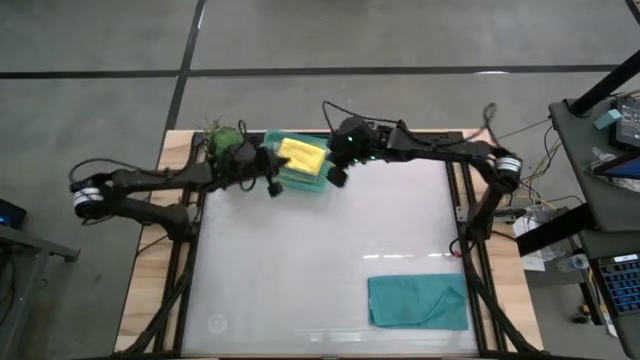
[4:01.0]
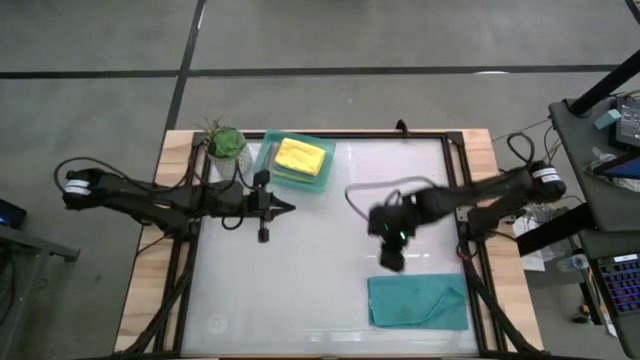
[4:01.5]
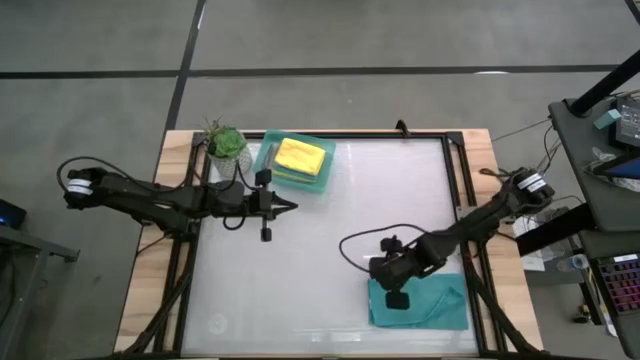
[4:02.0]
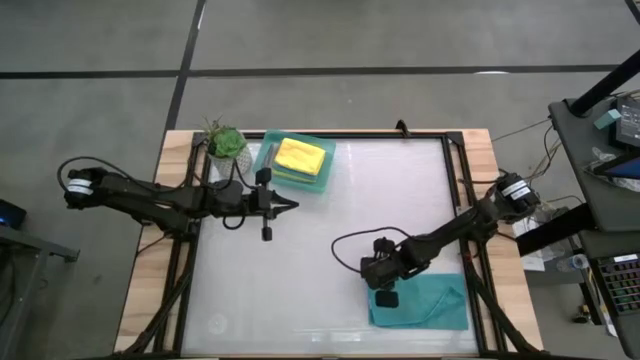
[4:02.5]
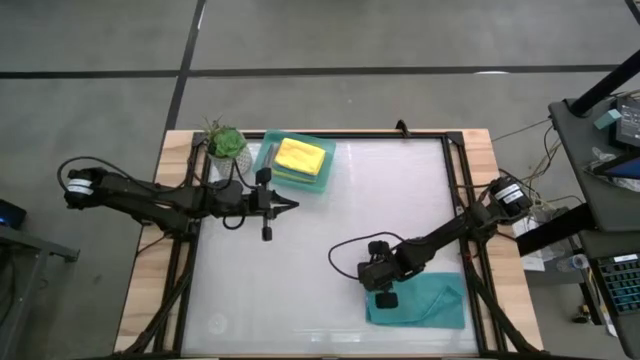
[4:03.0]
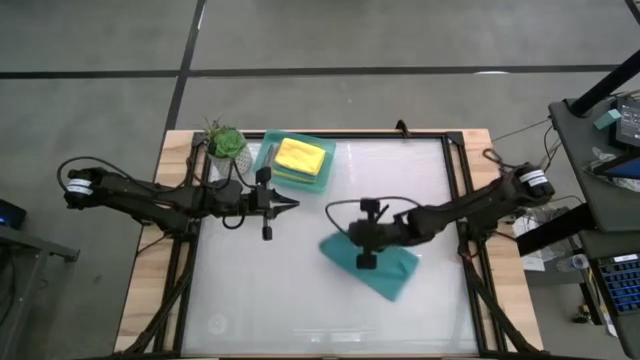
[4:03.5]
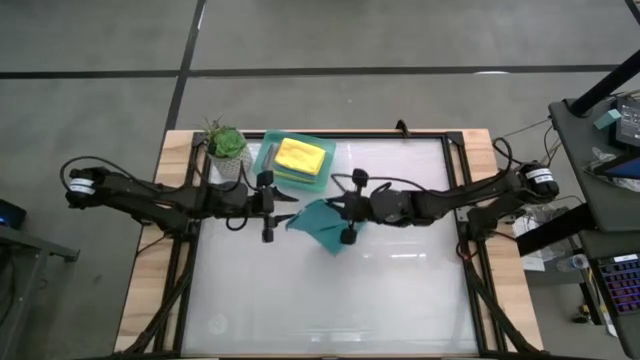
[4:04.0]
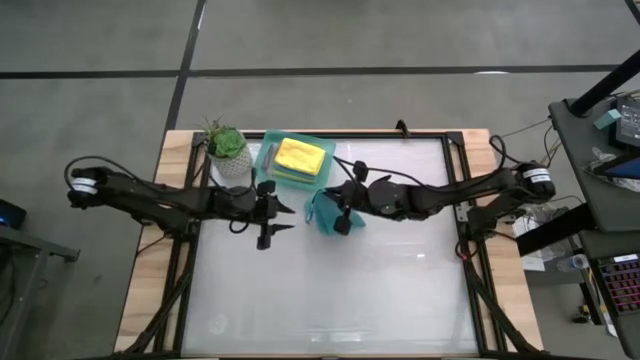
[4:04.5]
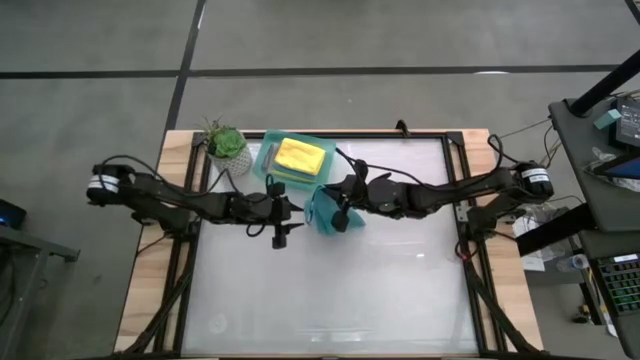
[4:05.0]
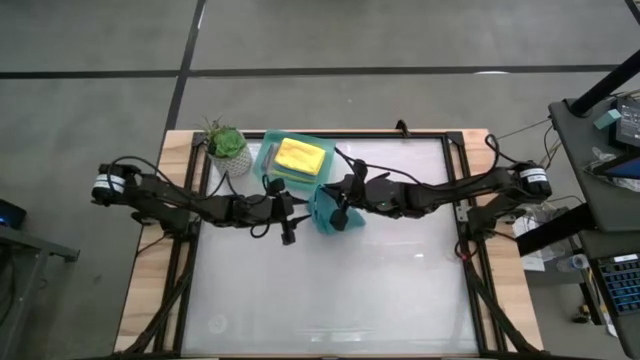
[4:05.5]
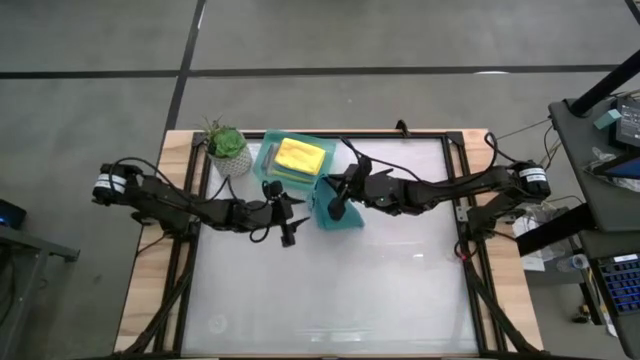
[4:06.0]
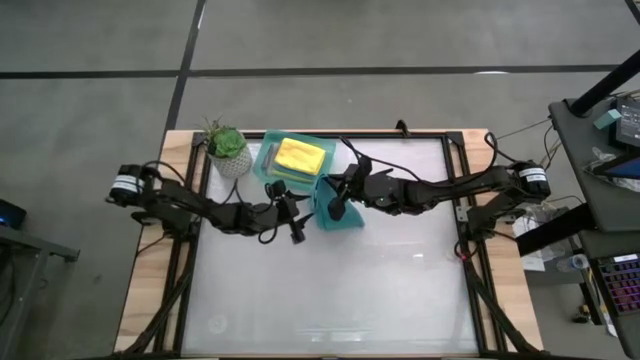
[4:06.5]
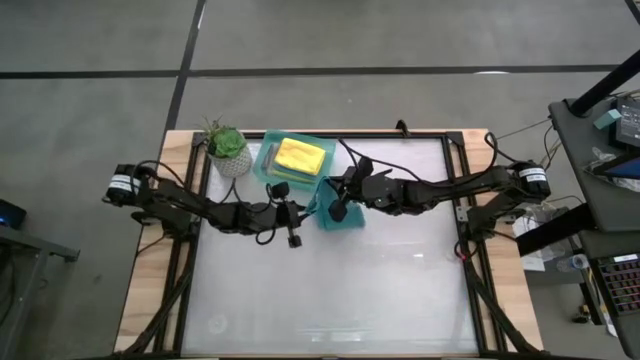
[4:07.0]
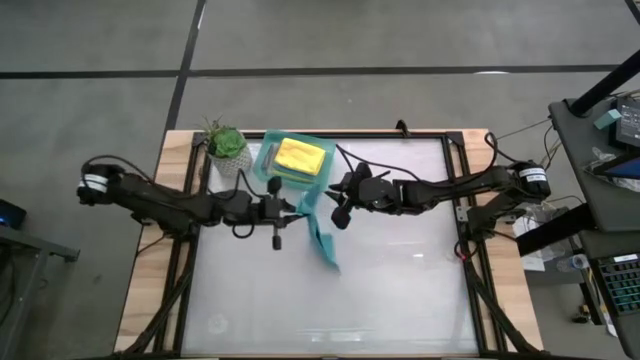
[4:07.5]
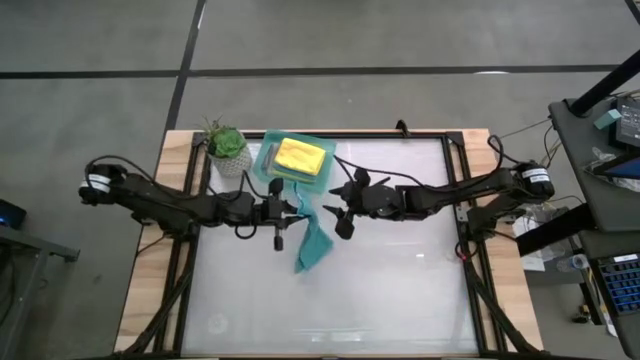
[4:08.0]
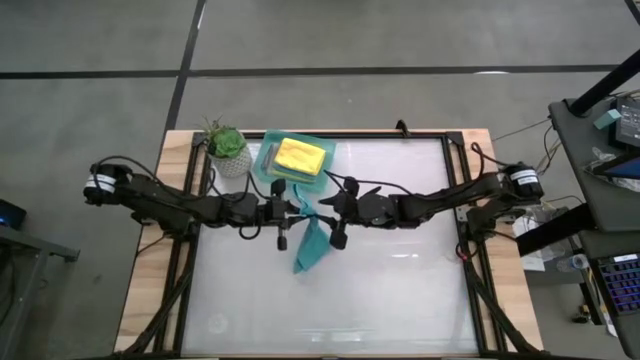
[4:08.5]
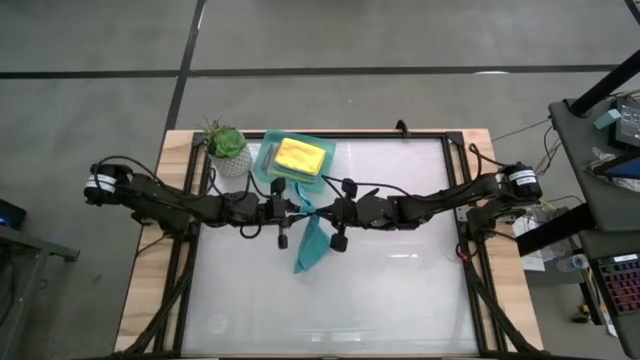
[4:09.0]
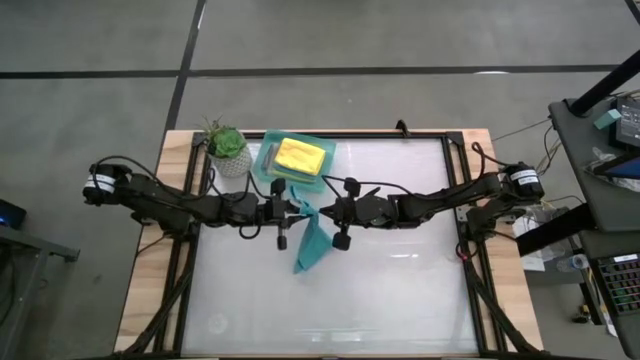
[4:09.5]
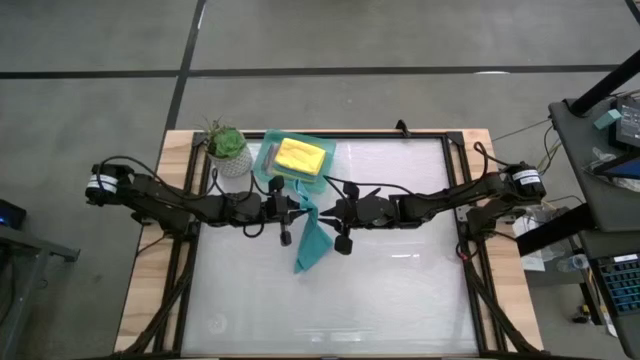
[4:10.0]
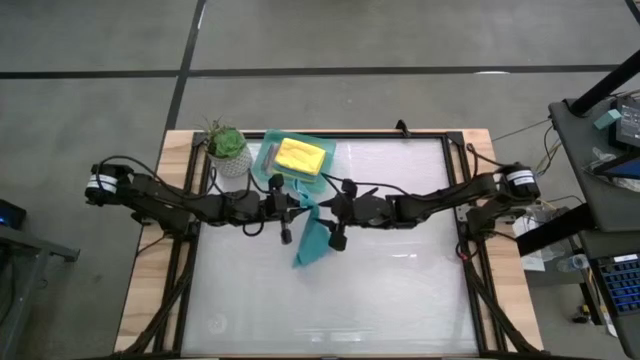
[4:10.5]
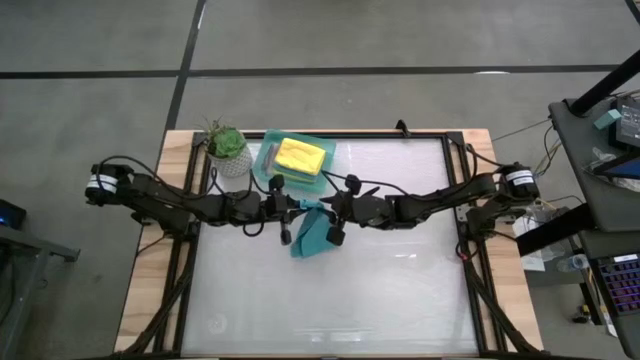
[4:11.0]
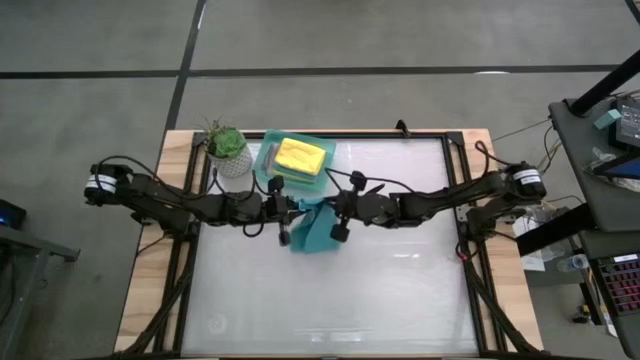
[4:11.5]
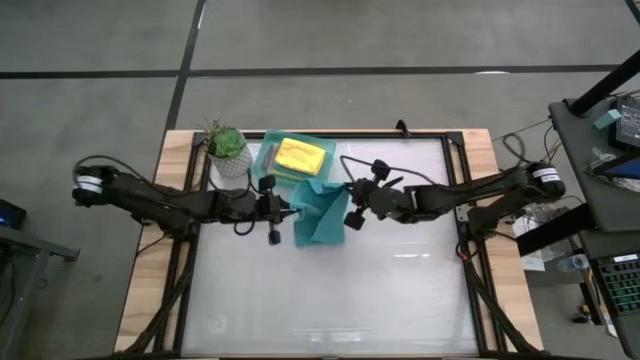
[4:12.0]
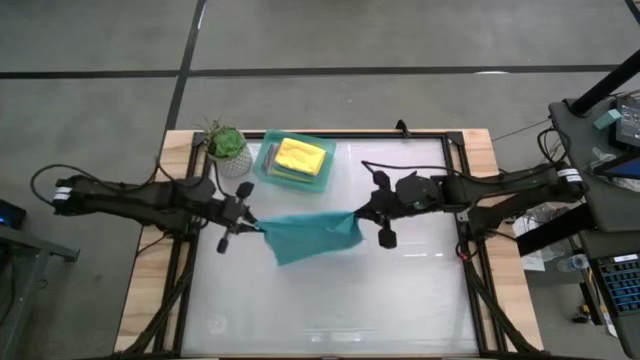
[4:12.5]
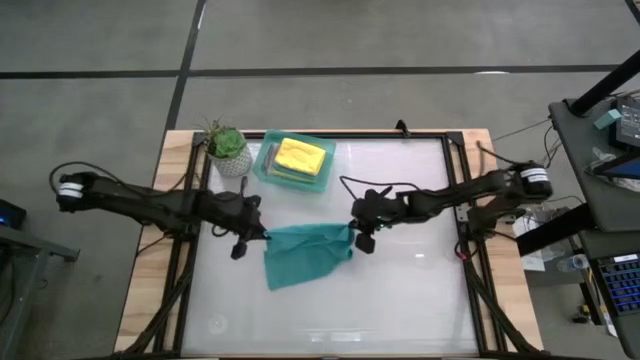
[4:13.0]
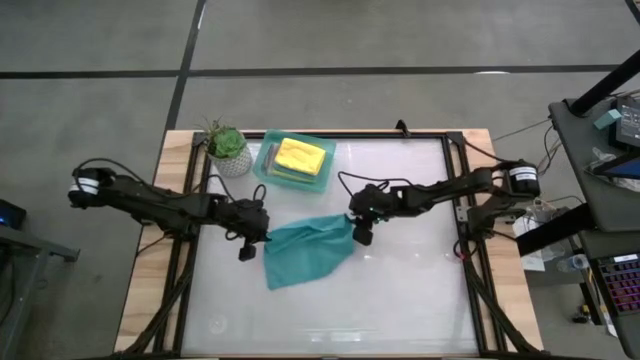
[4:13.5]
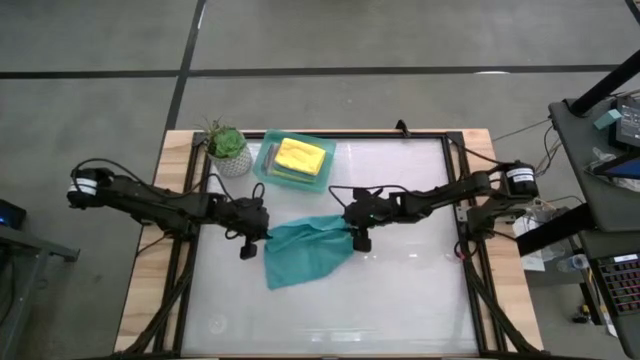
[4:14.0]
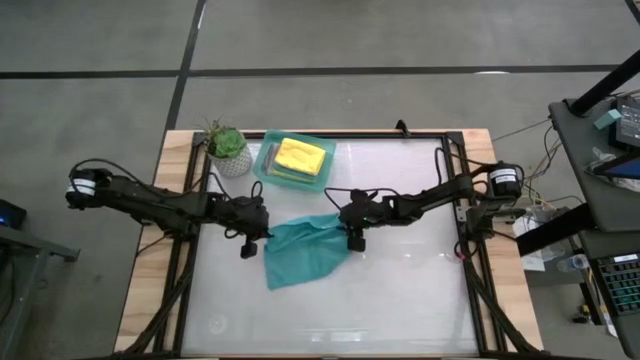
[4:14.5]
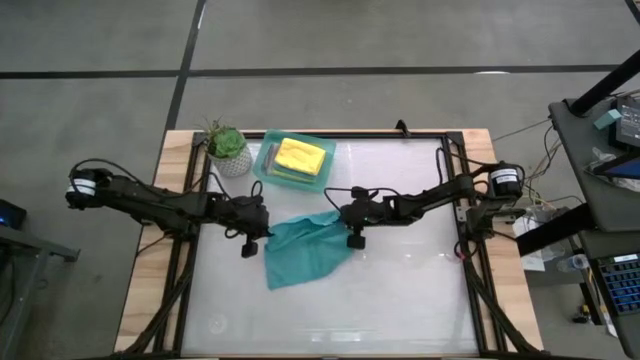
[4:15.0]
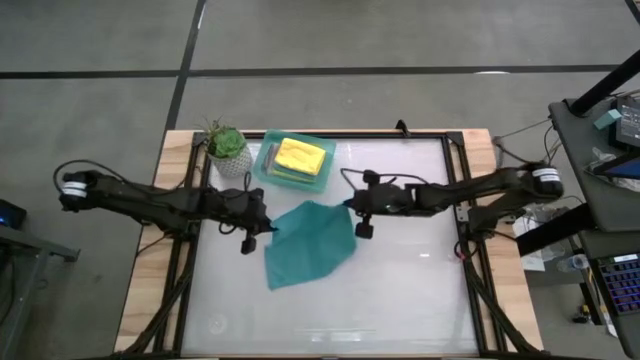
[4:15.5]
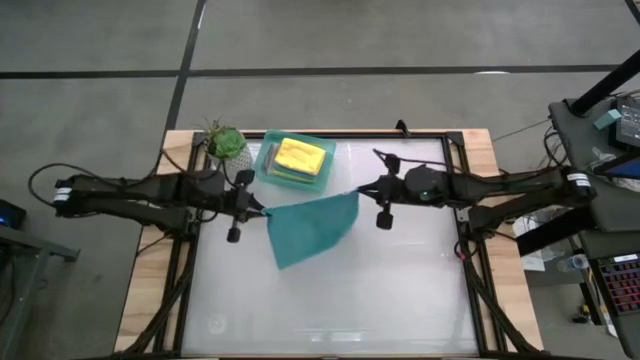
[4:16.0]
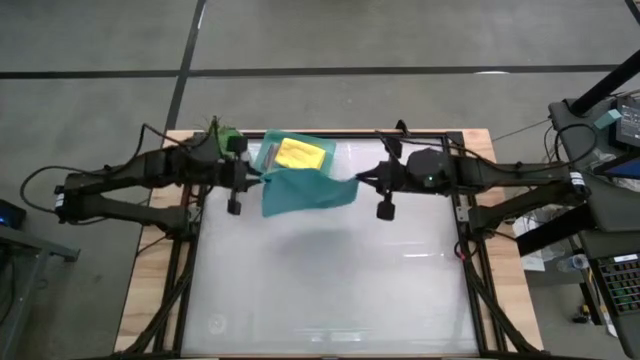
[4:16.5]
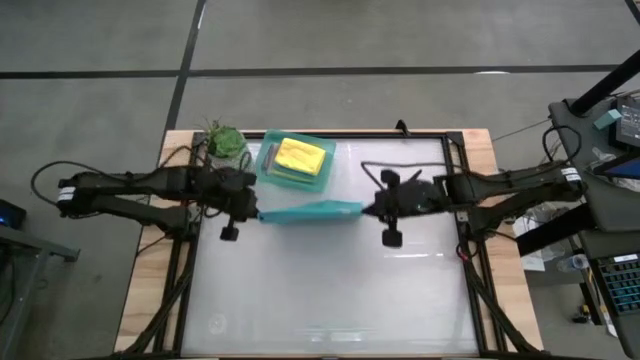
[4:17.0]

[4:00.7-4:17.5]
Task: Fold microfiber towels
Fold the blue microfiber towel

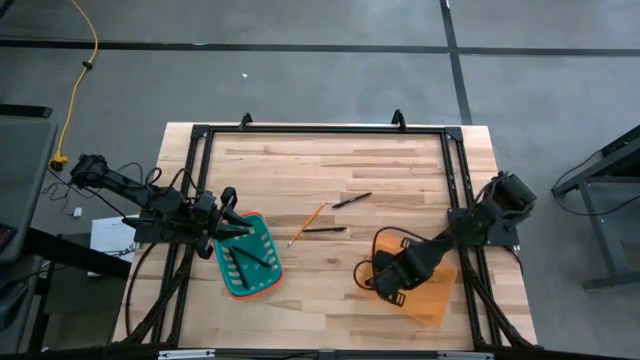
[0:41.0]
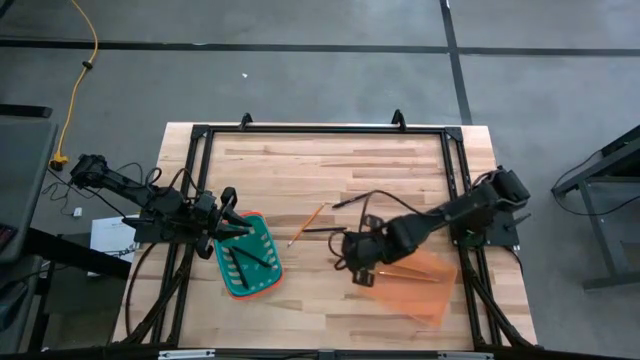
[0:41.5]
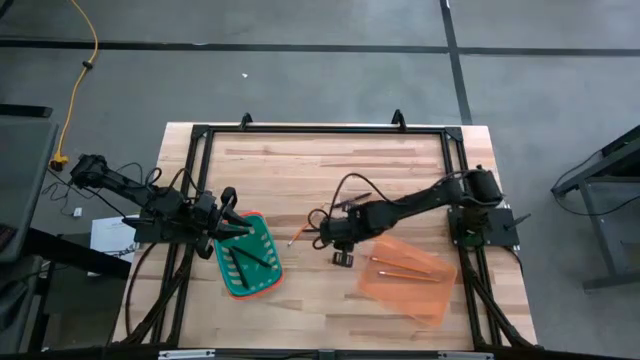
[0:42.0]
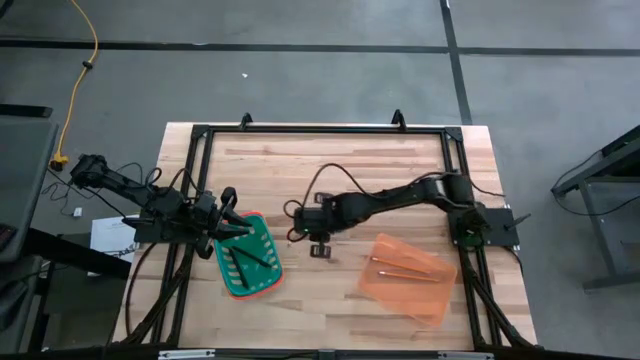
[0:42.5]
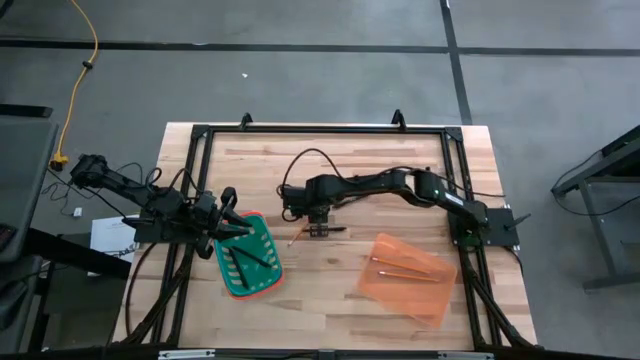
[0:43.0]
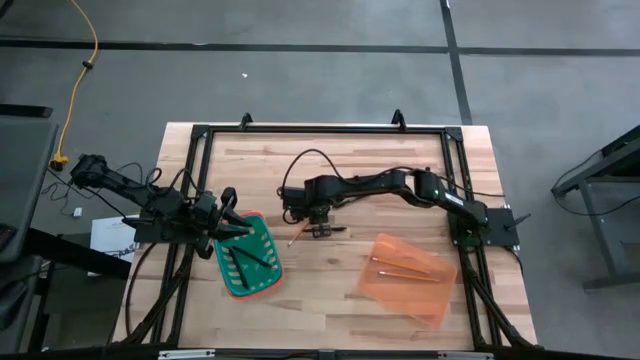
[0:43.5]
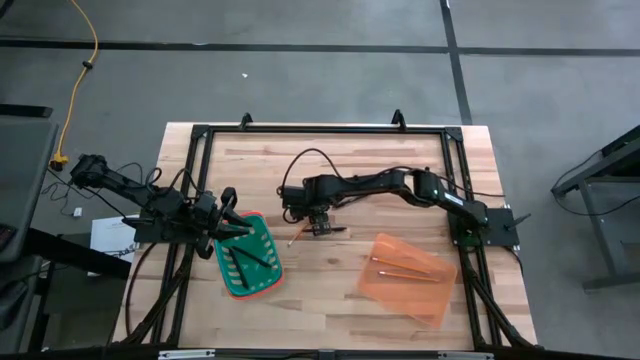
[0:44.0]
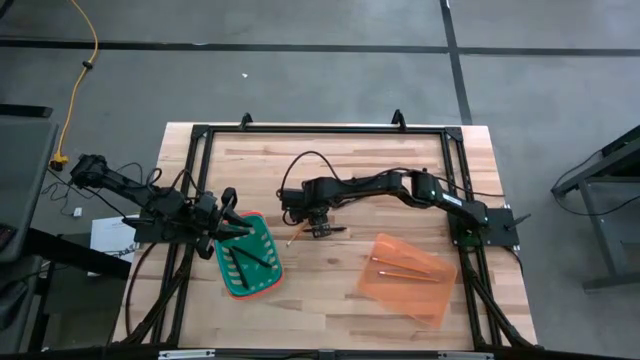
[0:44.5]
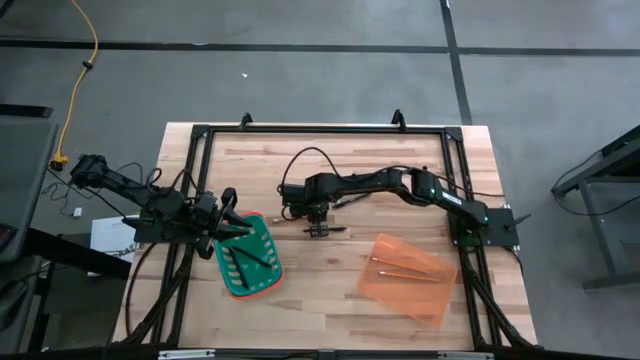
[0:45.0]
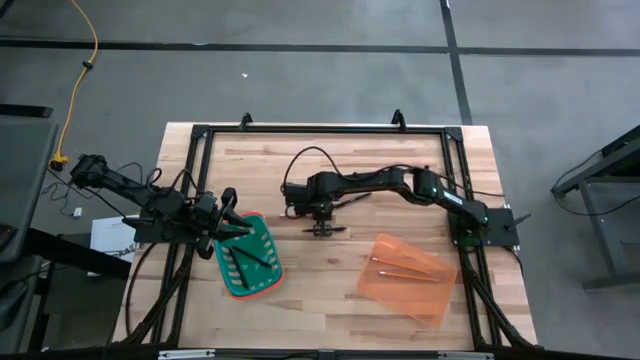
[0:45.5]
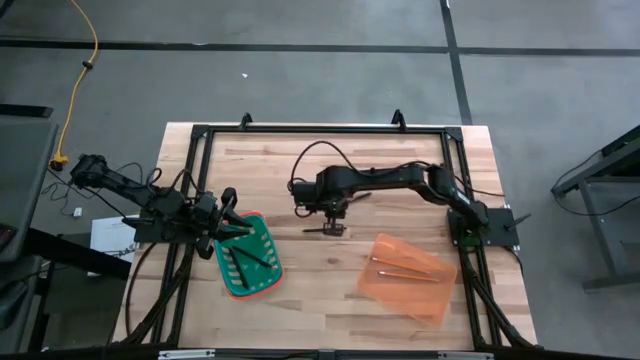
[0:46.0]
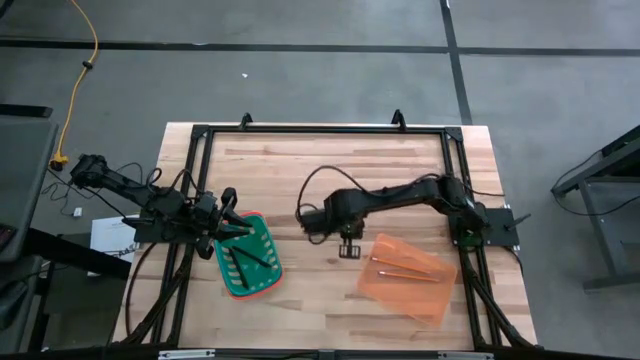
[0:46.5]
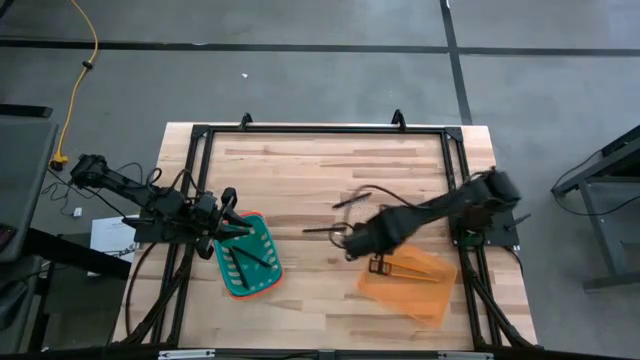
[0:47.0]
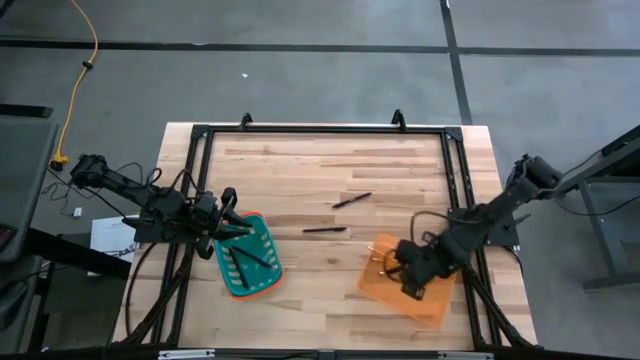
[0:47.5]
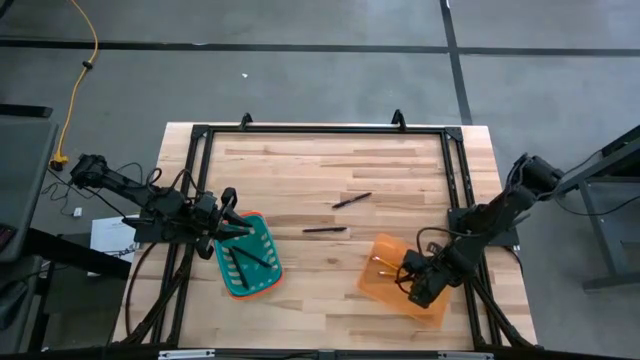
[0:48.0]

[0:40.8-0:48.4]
Task: Sort pens & pencils
Put the pencil into the orange bin
